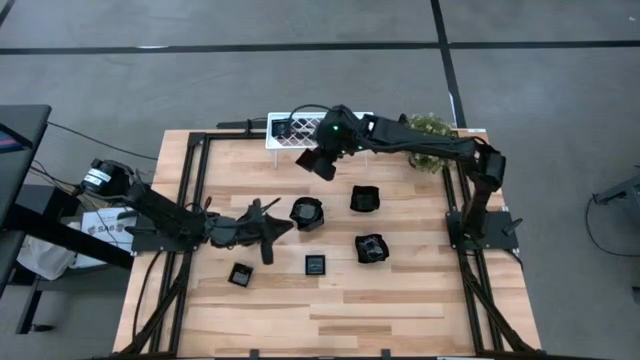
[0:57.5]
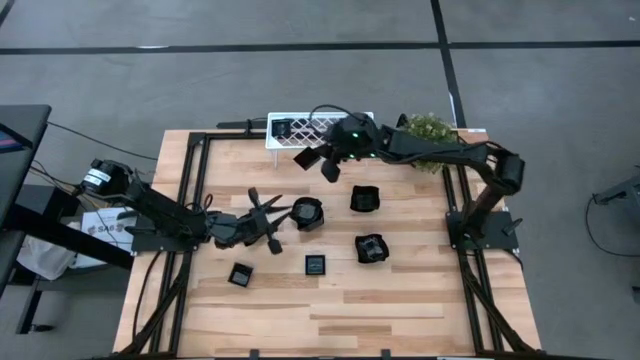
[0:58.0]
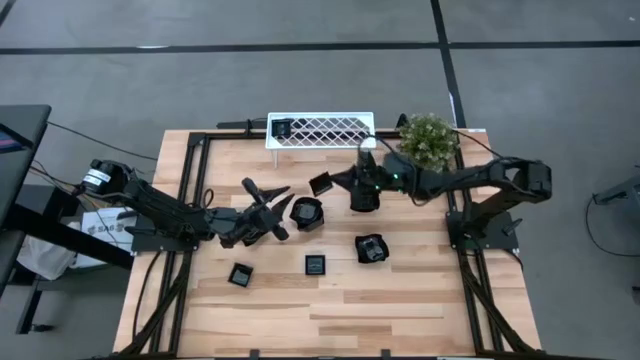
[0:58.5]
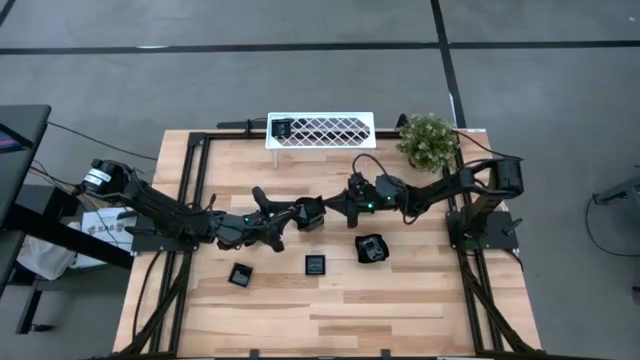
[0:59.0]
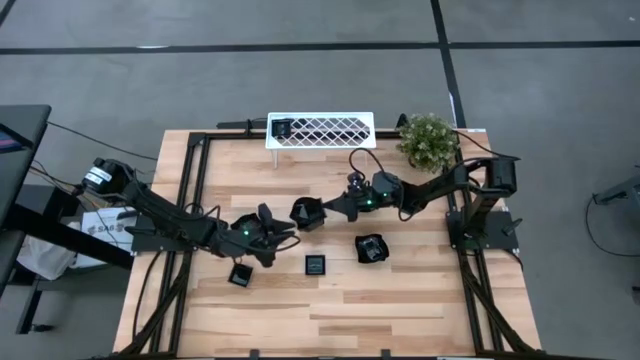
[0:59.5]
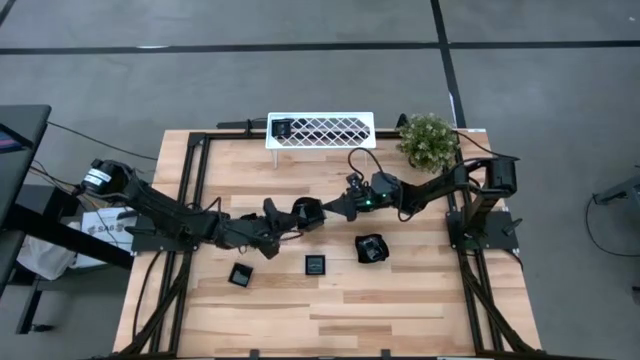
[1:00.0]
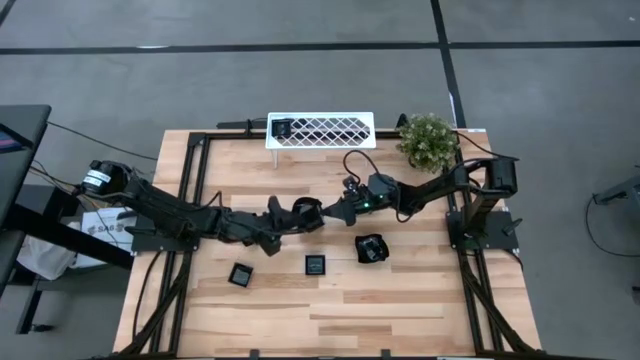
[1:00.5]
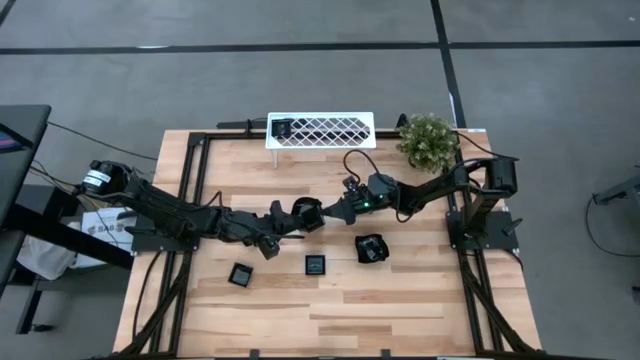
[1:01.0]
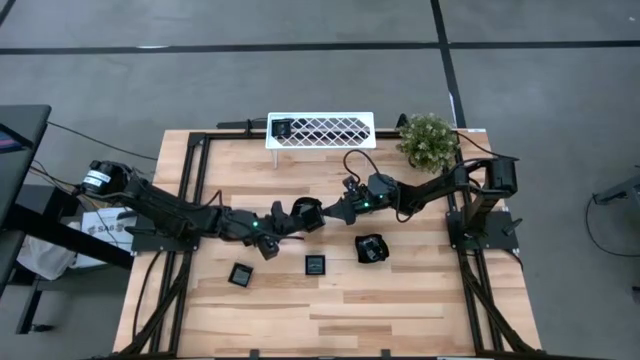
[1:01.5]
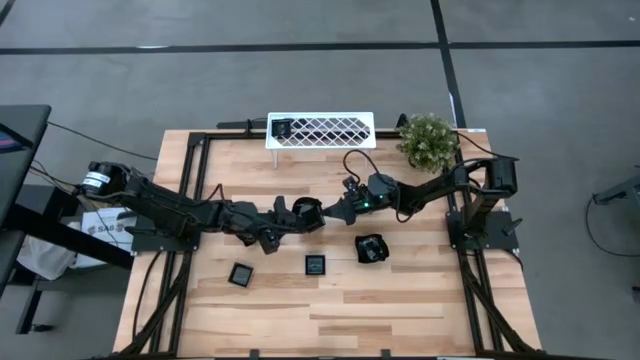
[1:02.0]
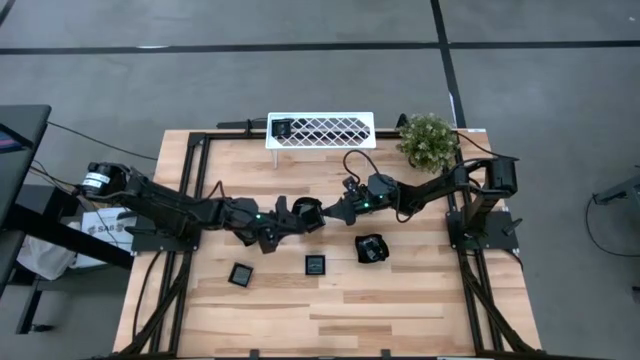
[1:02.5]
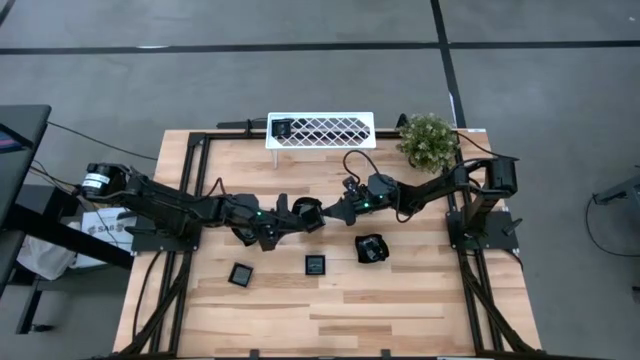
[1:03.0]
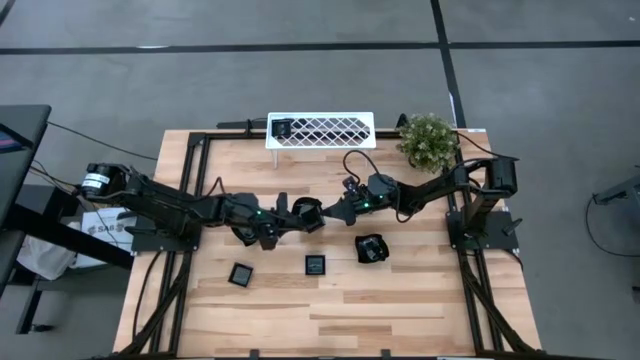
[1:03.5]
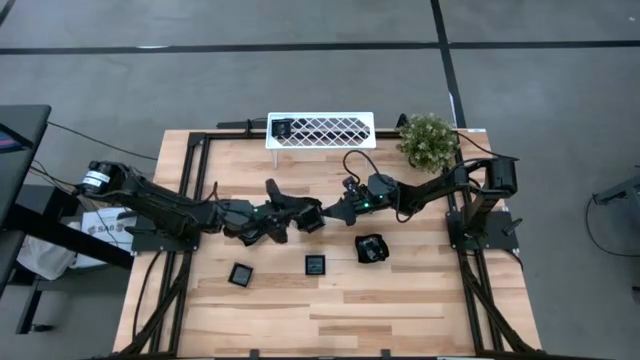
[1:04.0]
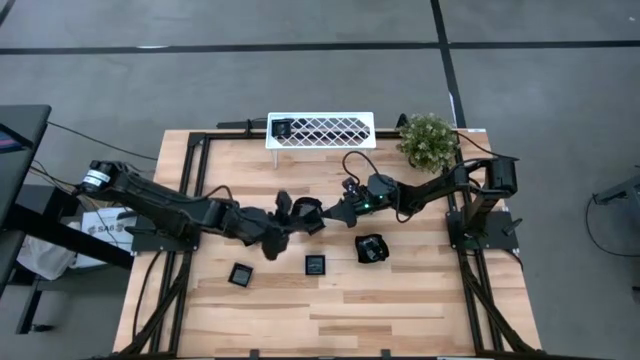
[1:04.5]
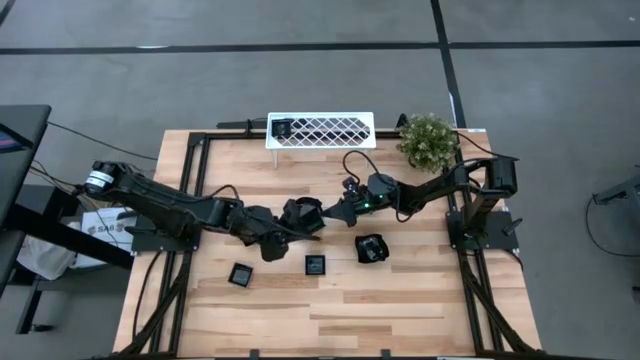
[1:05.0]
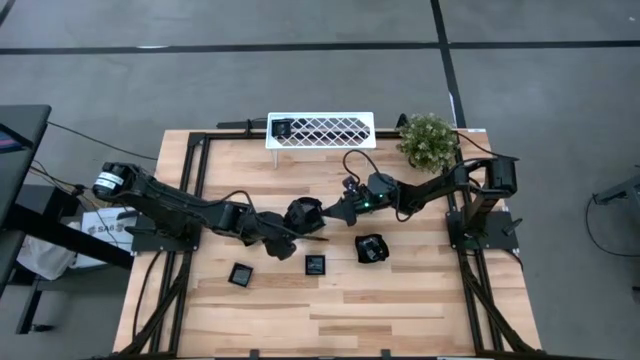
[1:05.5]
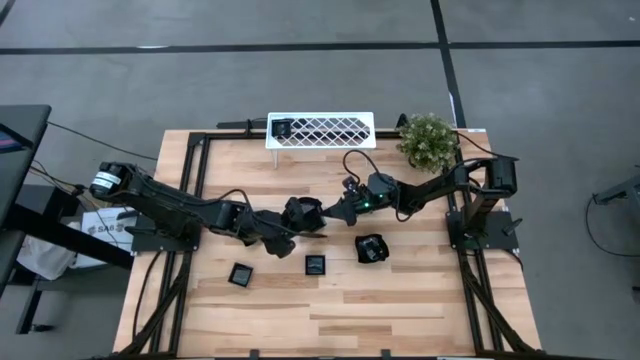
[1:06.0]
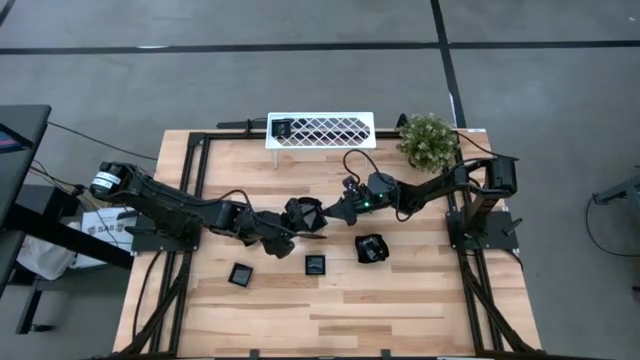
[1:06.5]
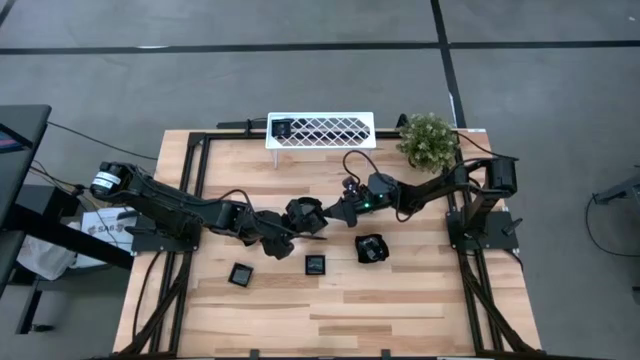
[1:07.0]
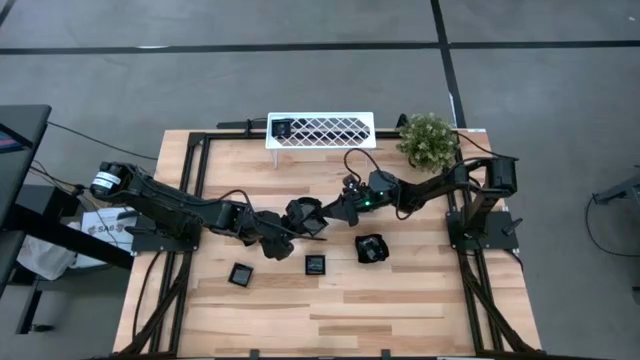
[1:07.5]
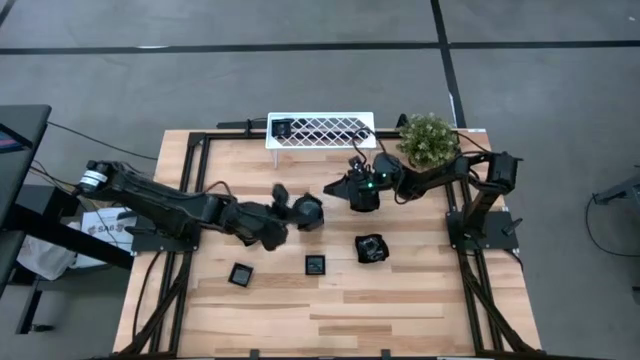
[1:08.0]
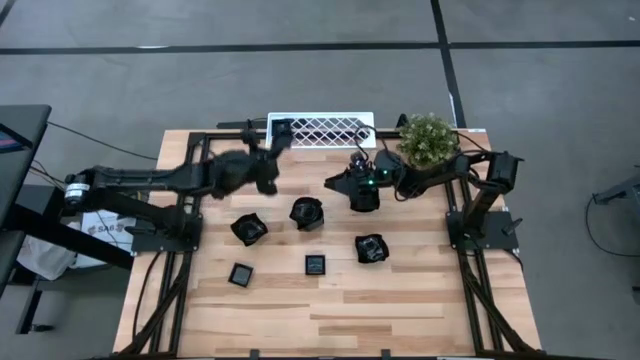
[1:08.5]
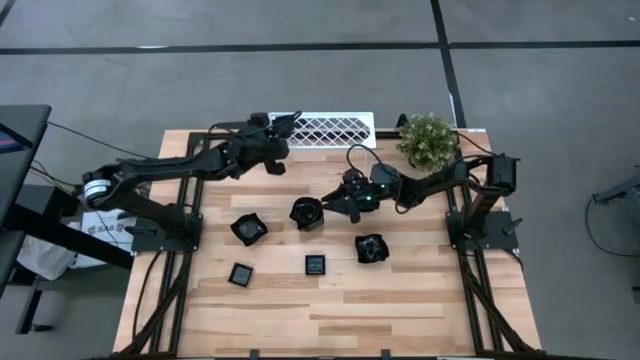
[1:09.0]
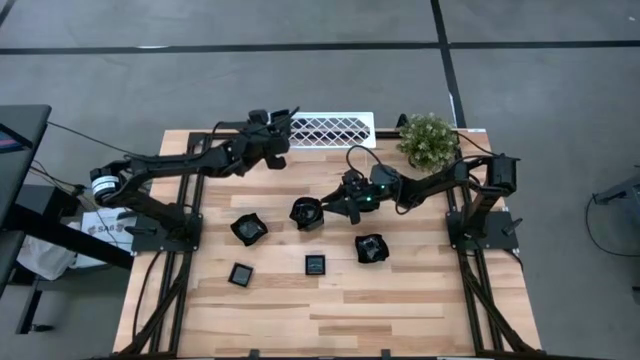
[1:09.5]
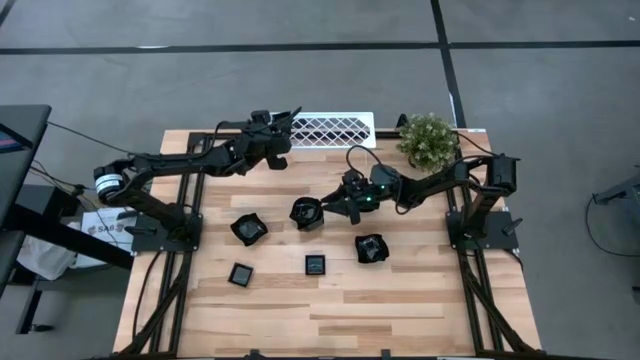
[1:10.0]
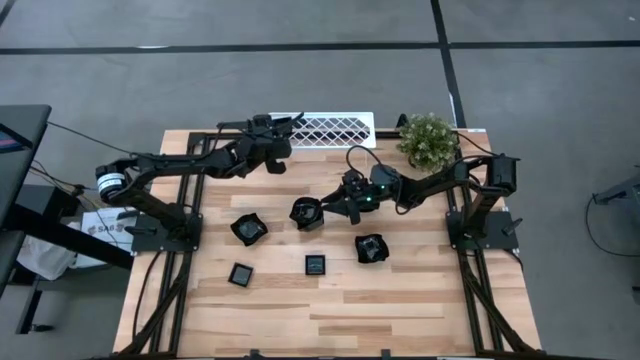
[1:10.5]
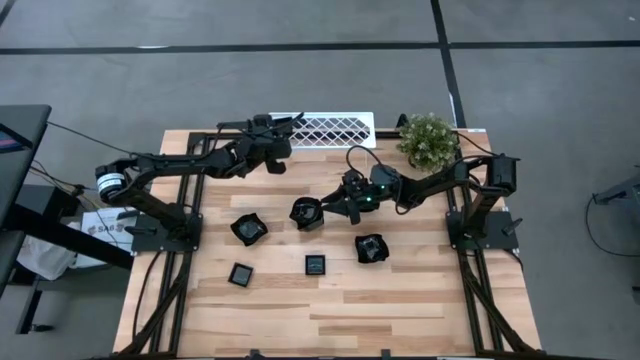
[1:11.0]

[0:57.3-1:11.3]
Task: Pick & Place Mini shaped plates
Stack the top black square plate on top of the black square plate on the shelf

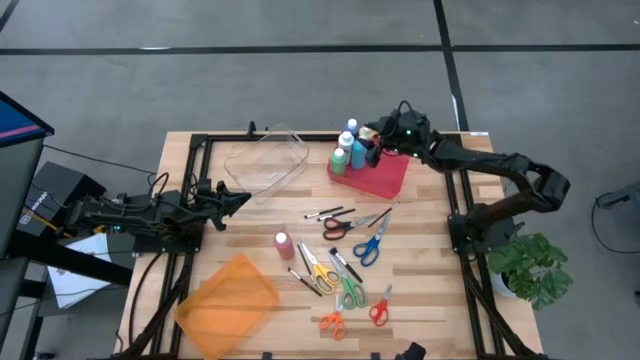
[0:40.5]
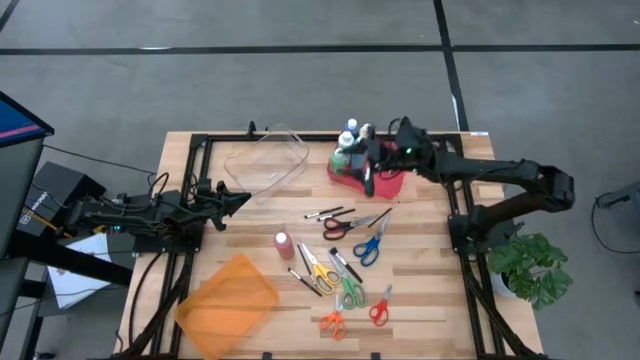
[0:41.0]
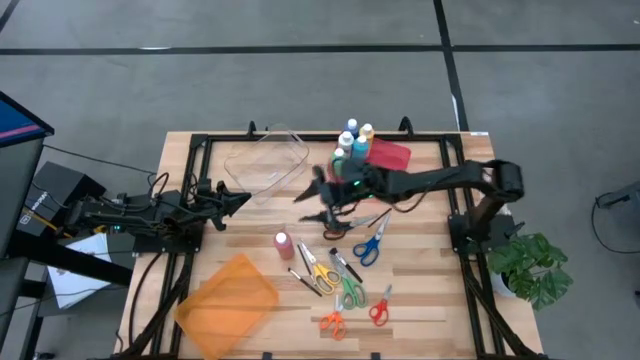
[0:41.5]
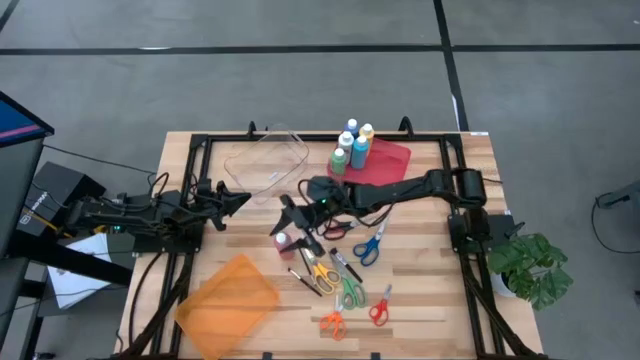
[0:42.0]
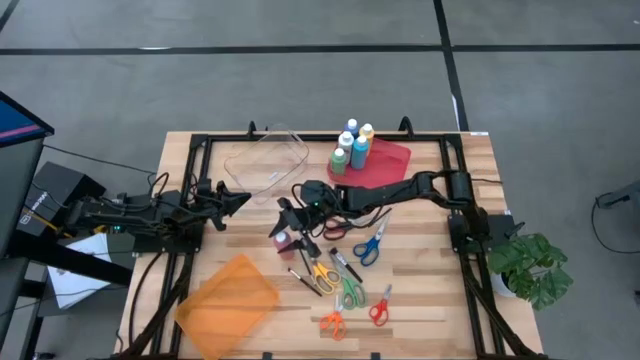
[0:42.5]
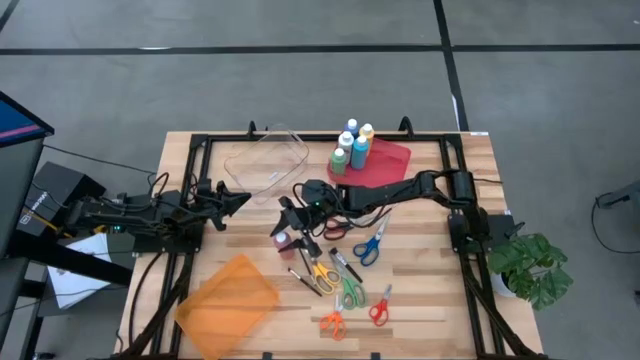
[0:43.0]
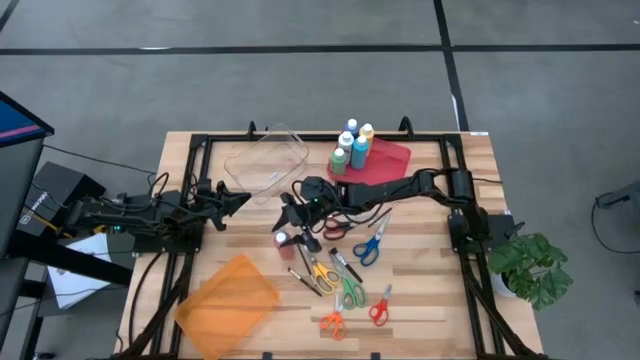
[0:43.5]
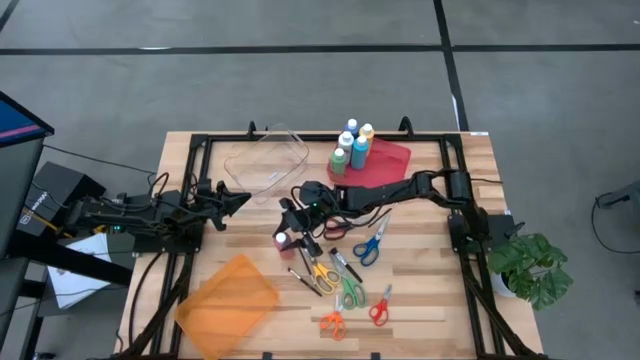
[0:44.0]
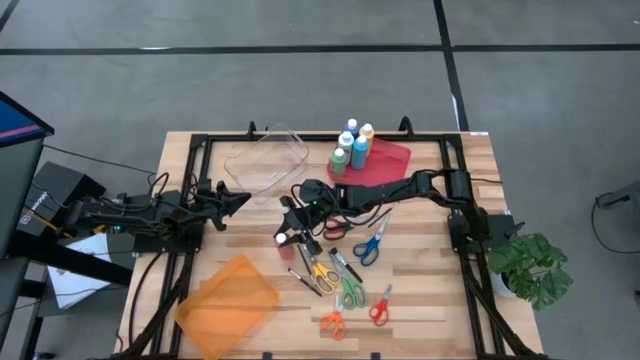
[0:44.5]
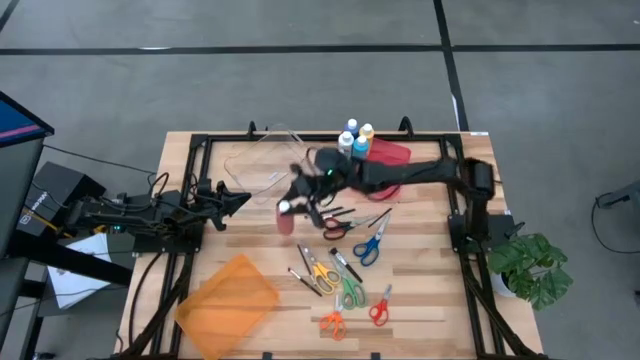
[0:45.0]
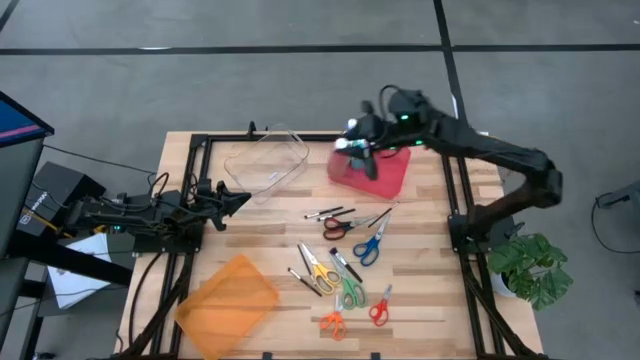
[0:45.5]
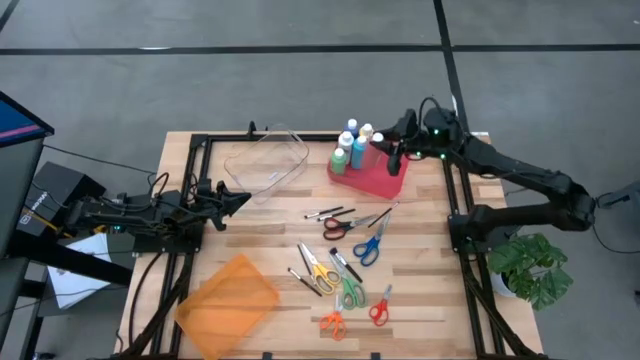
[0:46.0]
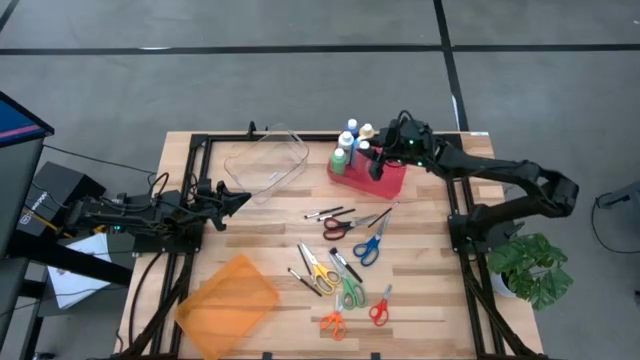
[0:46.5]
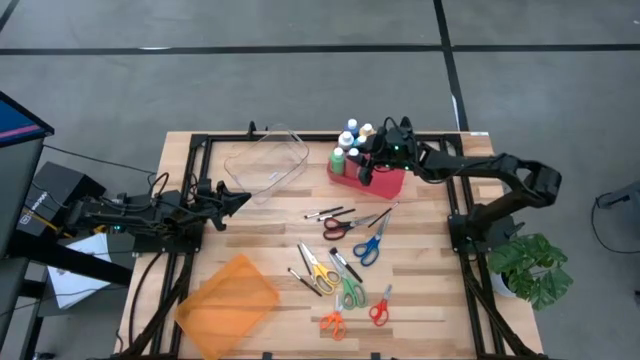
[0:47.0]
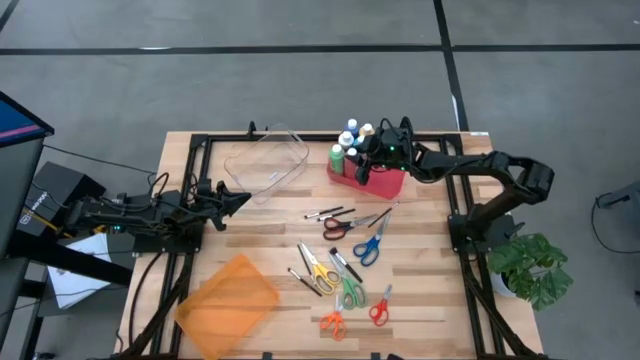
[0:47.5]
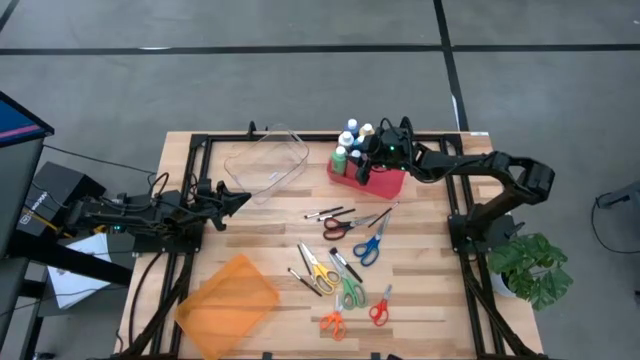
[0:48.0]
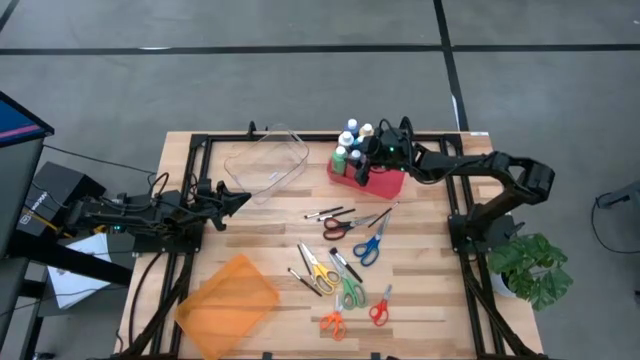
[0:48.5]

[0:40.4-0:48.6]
Task: Pick & Place Paint Supplies
Put the pink paint bottle into the red bin
